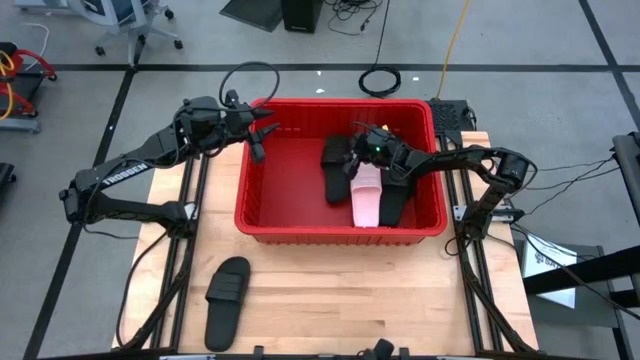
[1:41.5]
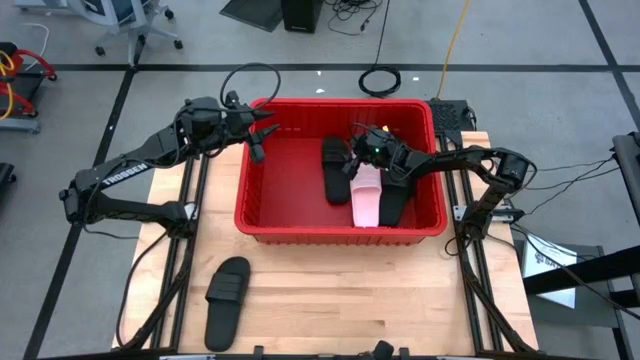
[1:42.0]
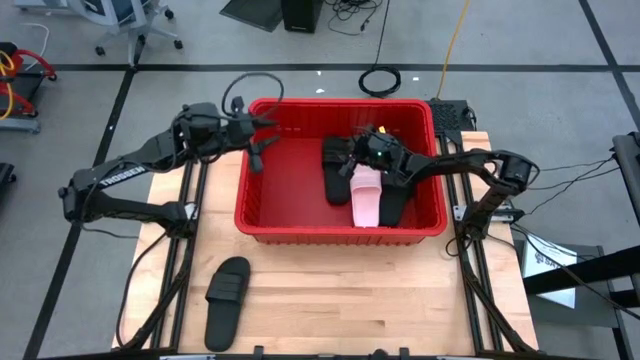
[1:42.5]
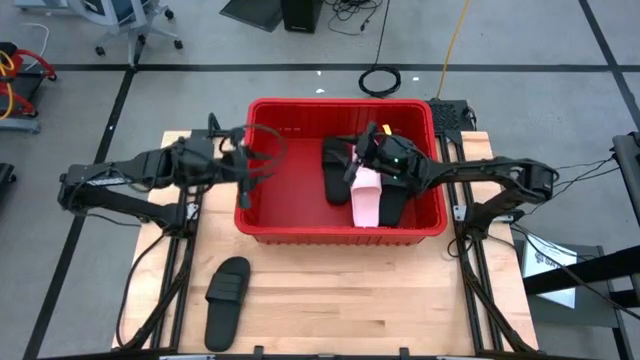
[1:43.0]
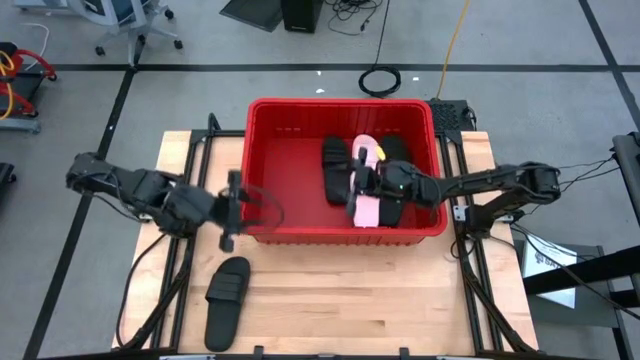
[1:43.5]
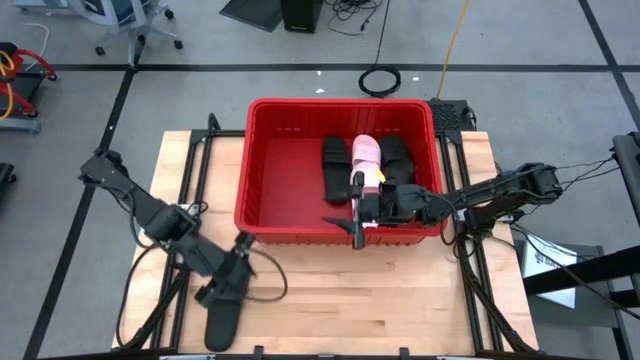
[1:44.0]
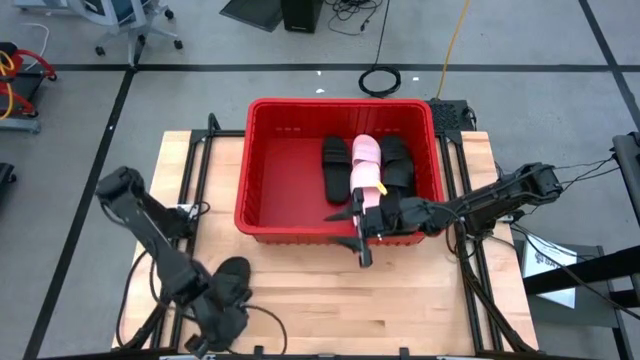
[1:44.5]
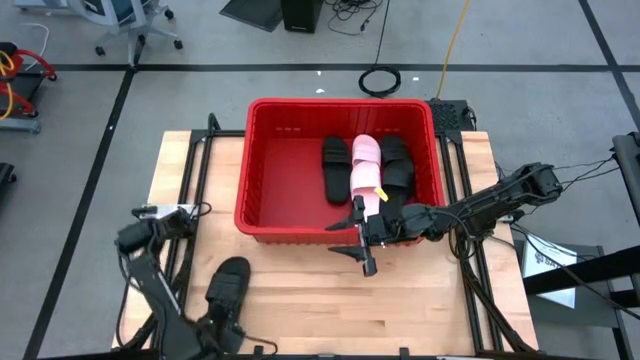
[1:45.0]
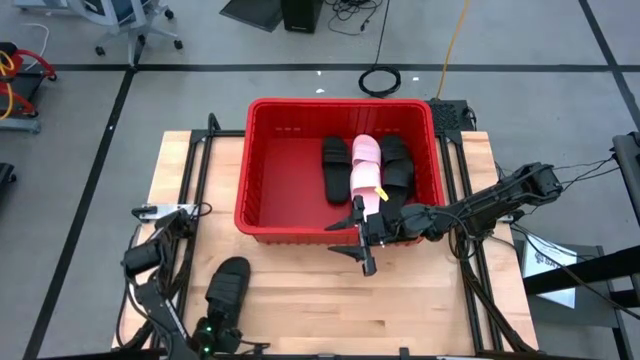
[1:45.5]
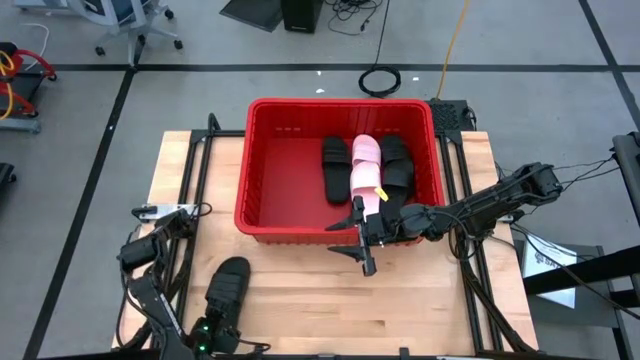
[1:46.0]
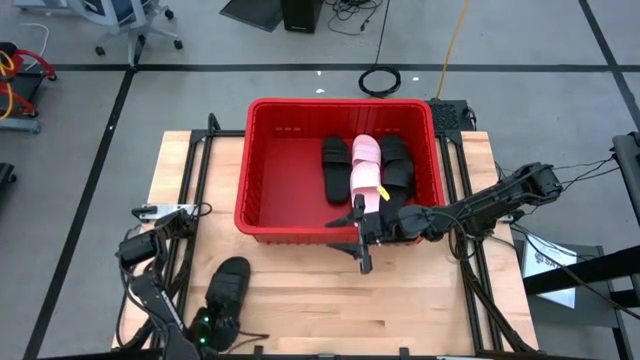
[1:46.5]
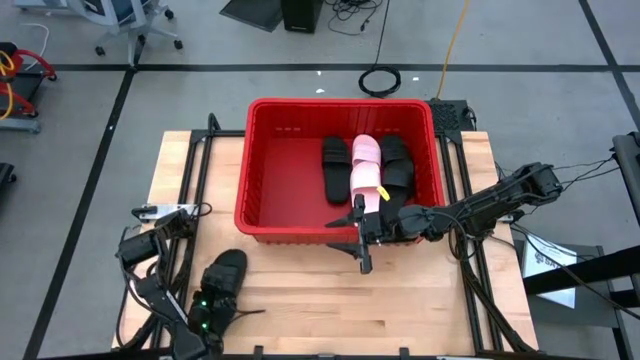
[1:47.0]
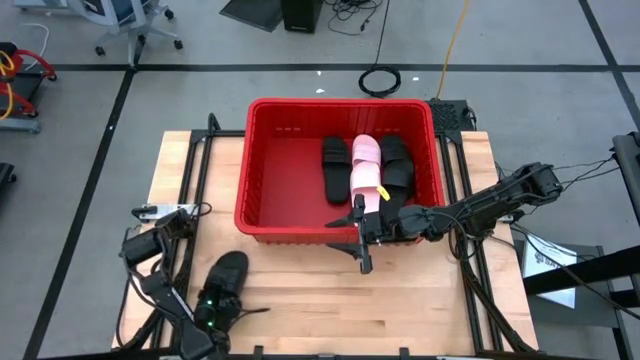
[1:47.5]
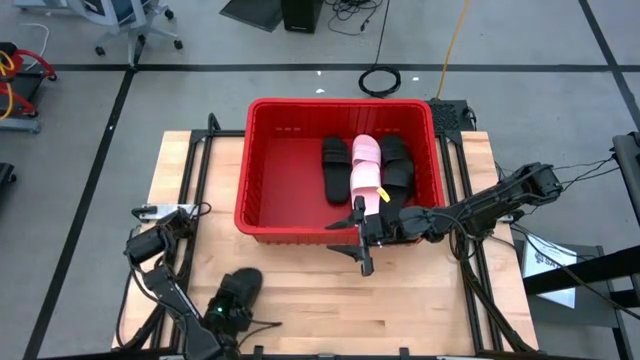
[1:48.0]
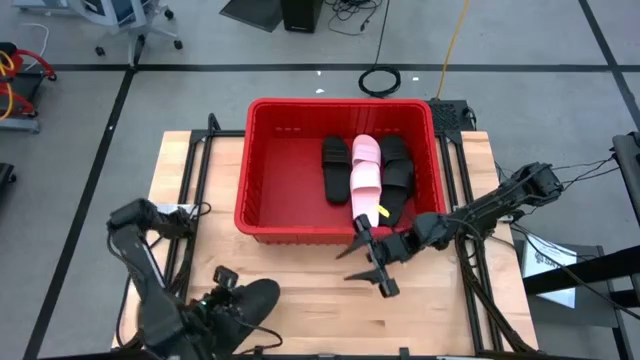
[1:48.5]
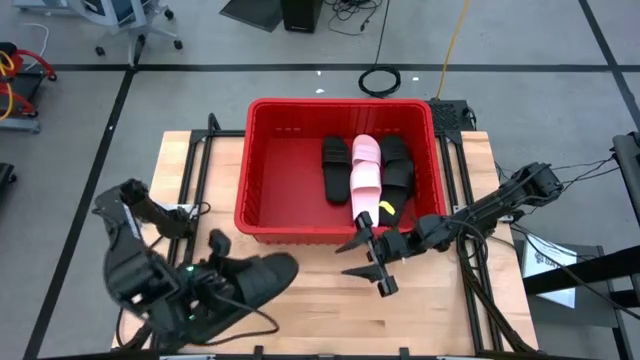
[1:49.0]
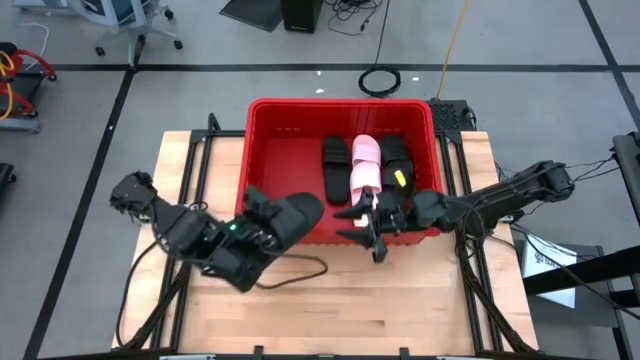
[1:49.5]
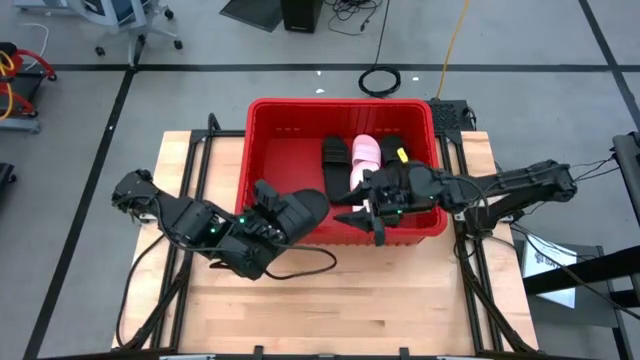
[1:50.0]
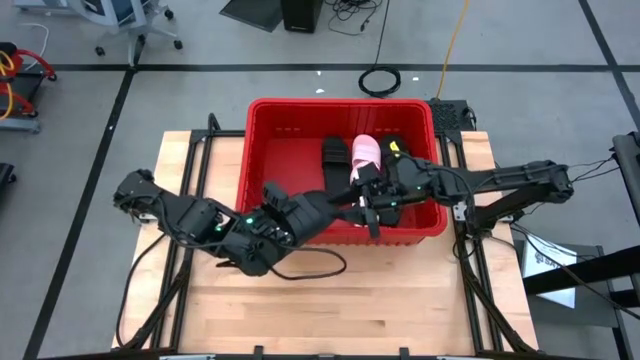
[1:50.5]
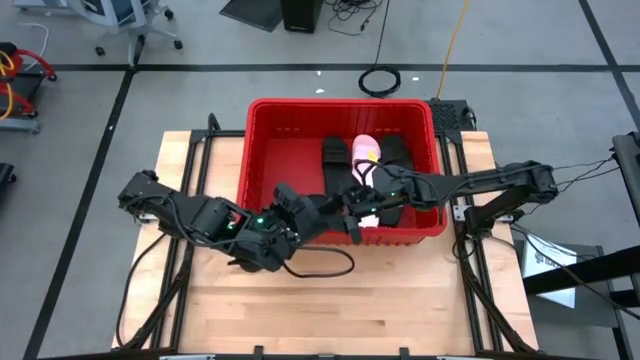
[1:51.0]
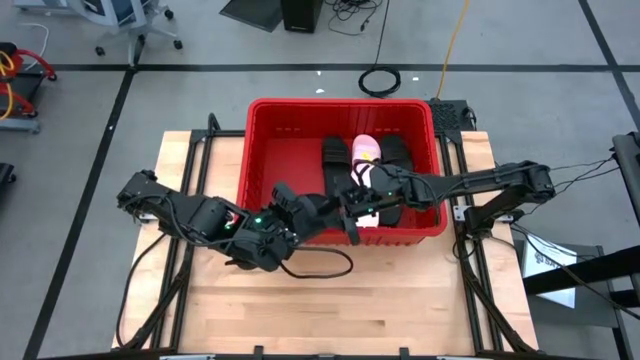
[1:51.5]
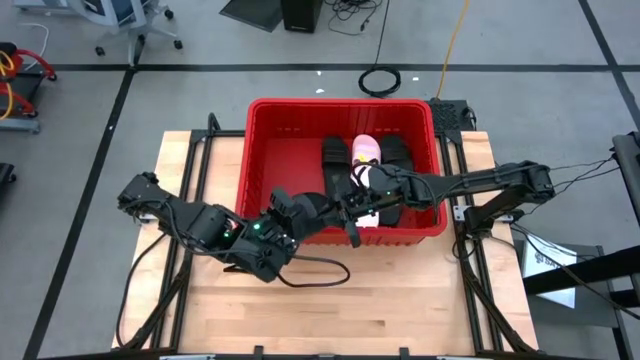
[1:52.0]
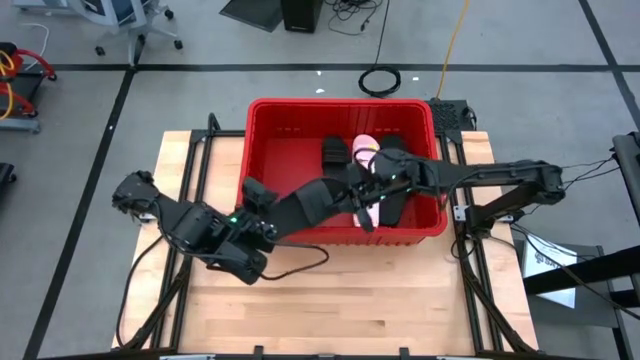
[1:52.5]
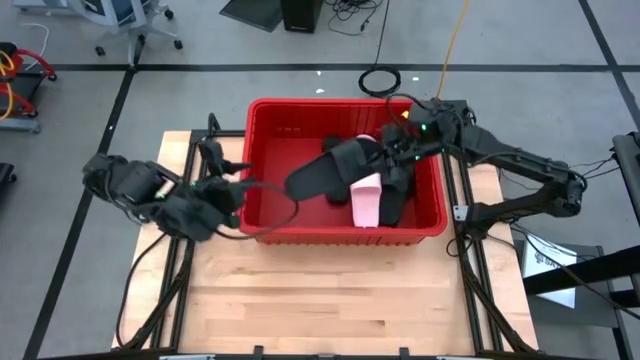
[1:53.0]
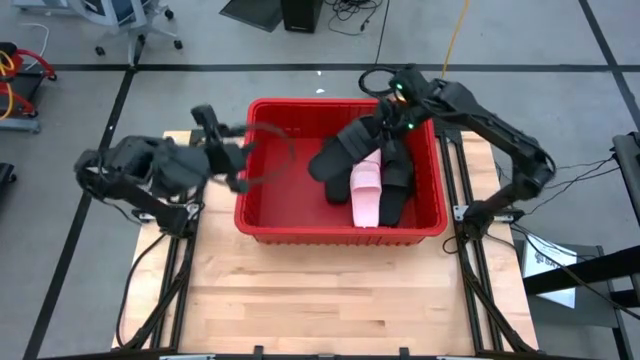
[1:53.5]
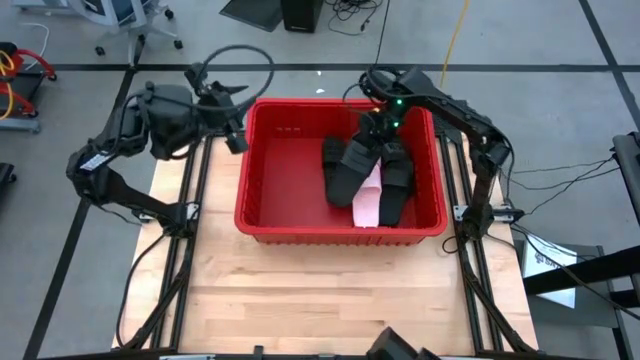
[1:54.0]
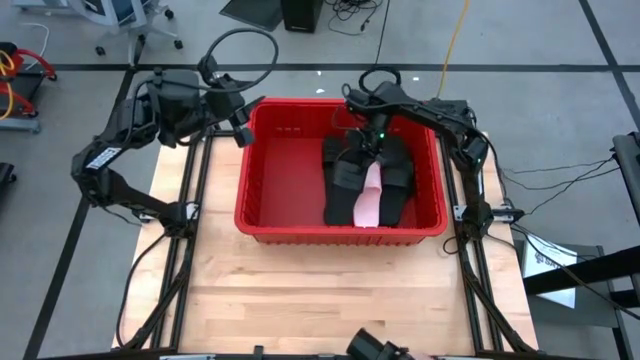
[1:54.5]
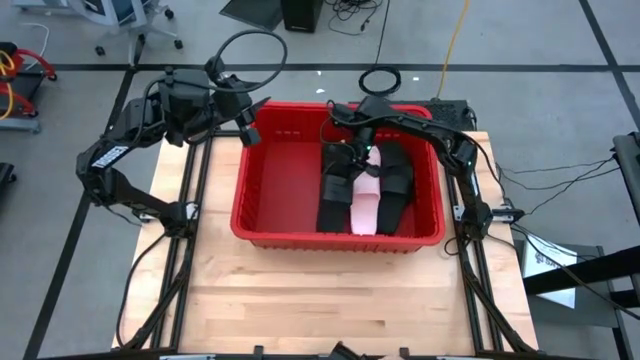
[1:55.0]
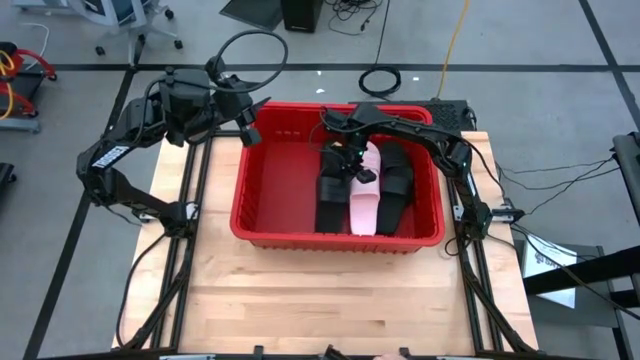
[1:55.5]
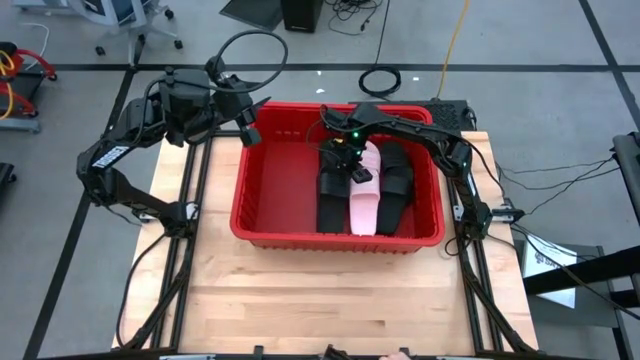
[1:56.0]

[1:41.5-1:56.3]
Task: Pick and place slides into bin
Put the black slide into the red bin
